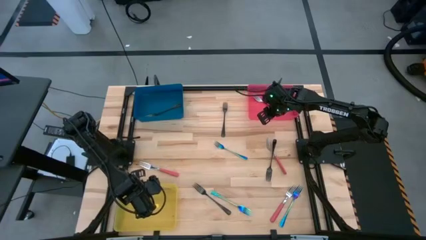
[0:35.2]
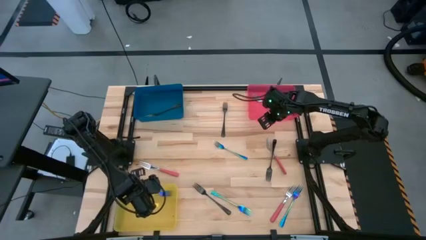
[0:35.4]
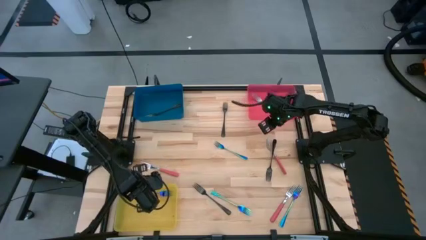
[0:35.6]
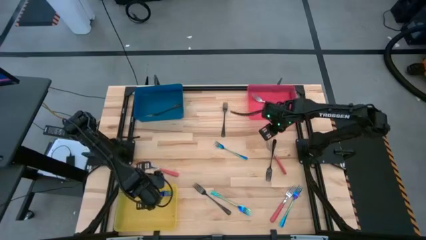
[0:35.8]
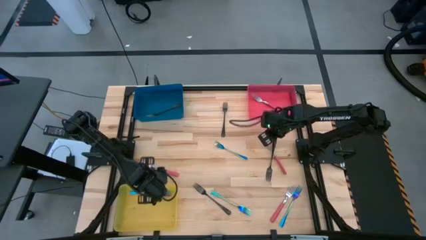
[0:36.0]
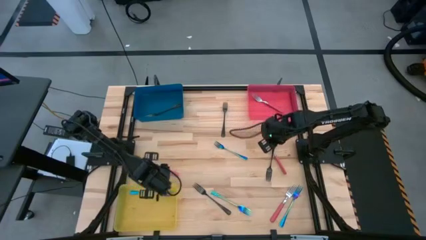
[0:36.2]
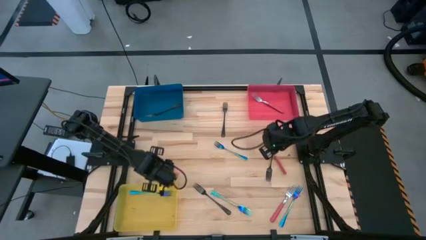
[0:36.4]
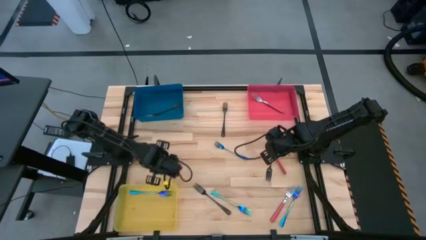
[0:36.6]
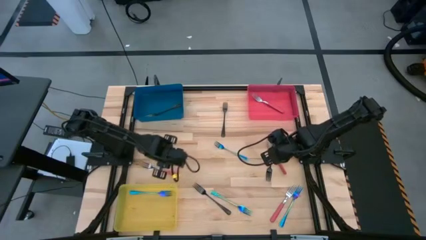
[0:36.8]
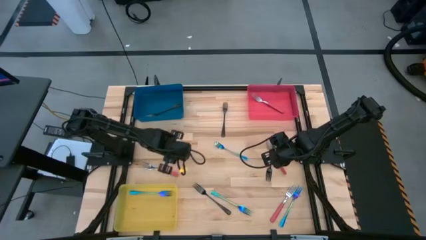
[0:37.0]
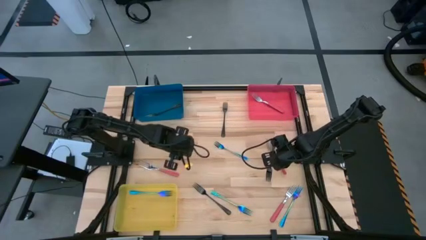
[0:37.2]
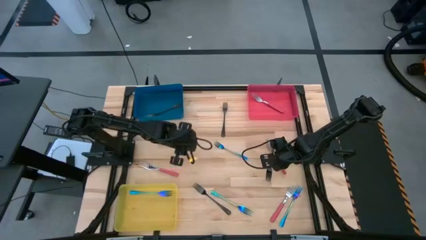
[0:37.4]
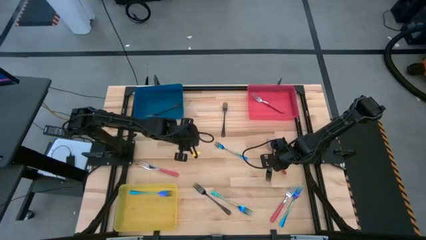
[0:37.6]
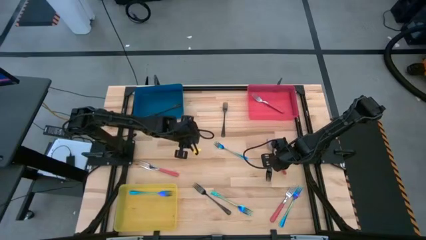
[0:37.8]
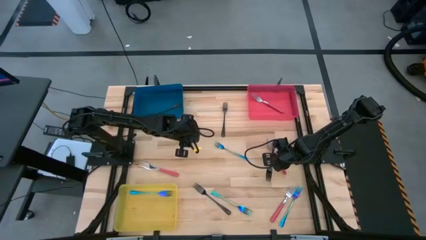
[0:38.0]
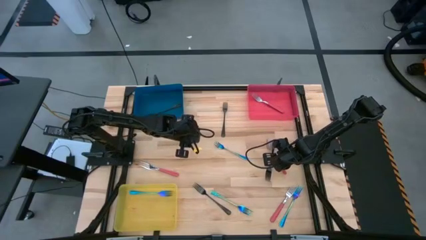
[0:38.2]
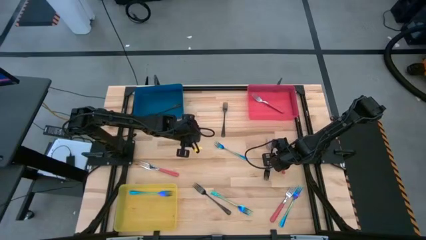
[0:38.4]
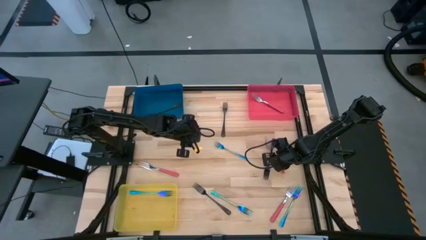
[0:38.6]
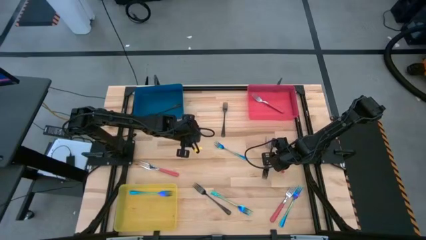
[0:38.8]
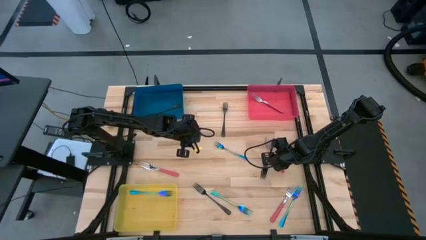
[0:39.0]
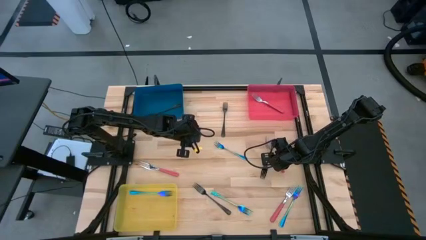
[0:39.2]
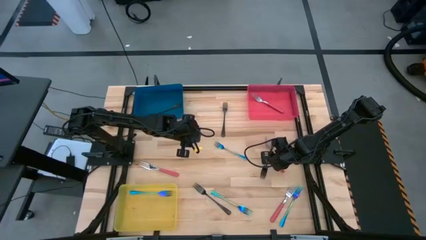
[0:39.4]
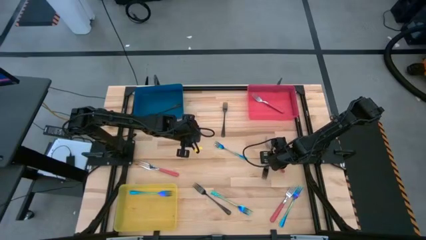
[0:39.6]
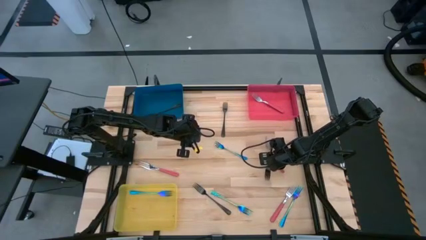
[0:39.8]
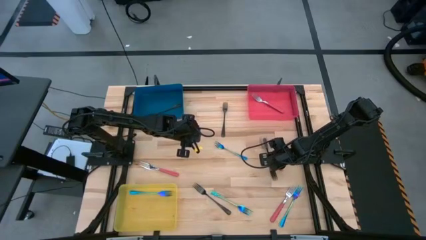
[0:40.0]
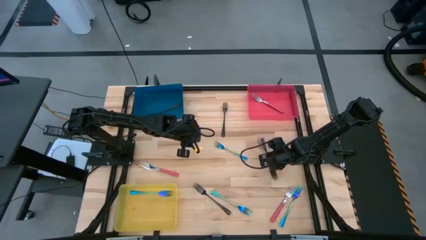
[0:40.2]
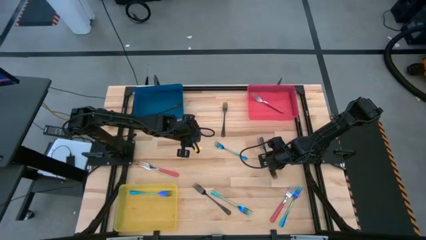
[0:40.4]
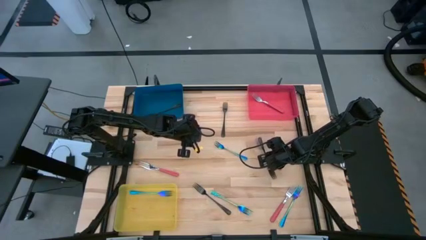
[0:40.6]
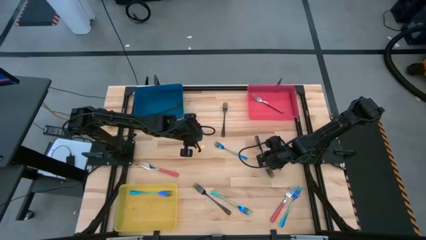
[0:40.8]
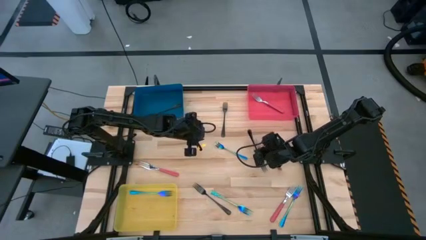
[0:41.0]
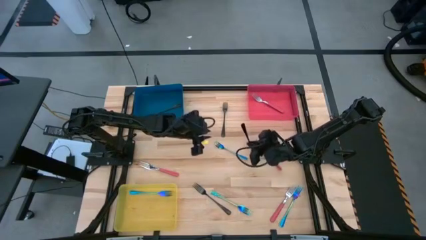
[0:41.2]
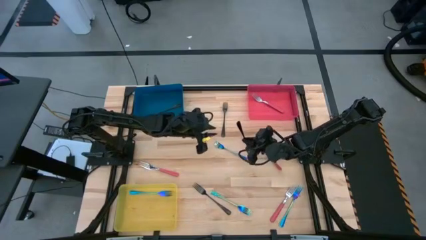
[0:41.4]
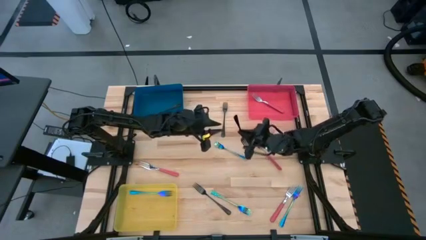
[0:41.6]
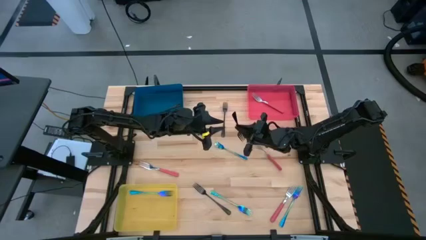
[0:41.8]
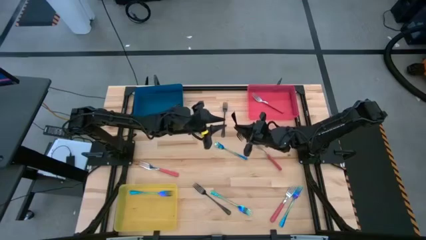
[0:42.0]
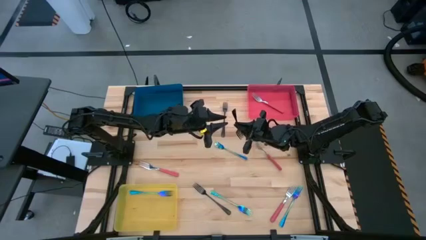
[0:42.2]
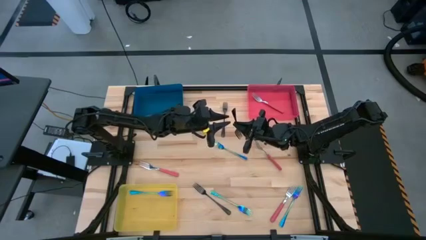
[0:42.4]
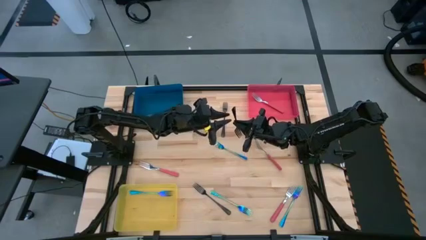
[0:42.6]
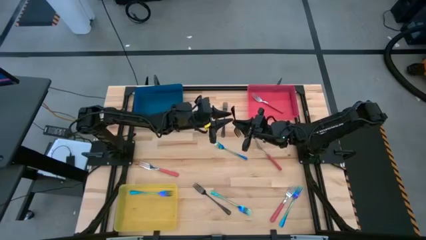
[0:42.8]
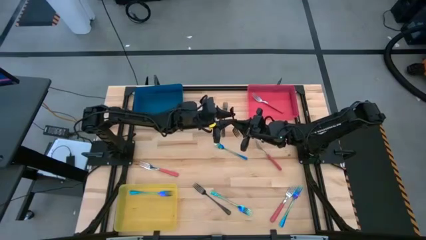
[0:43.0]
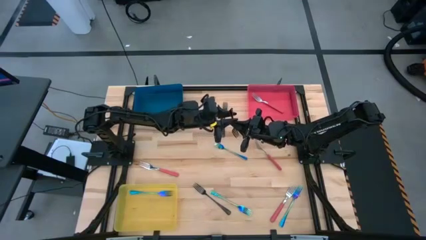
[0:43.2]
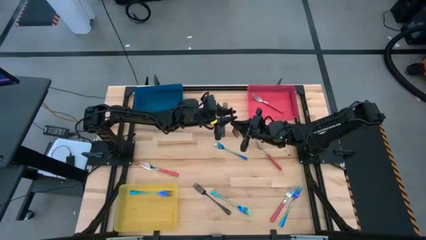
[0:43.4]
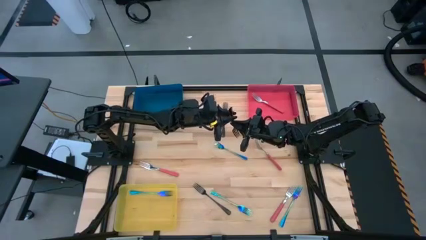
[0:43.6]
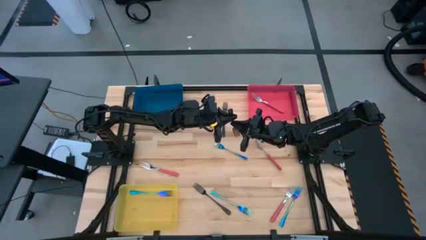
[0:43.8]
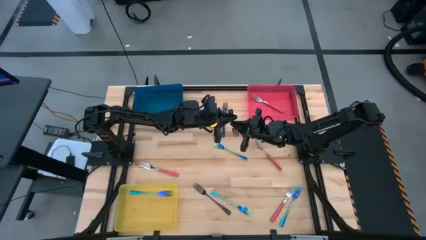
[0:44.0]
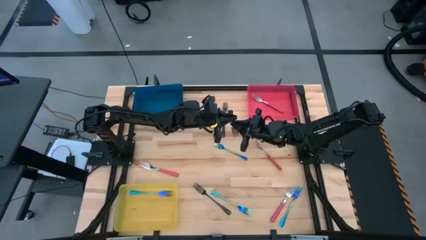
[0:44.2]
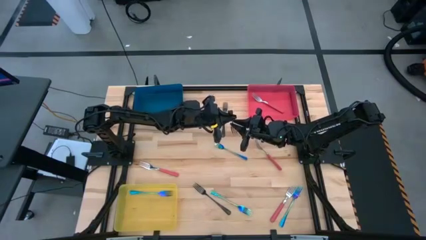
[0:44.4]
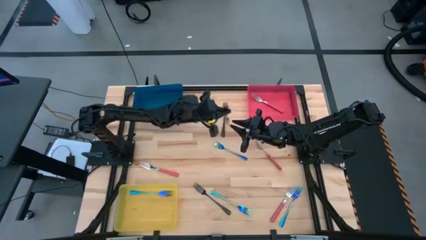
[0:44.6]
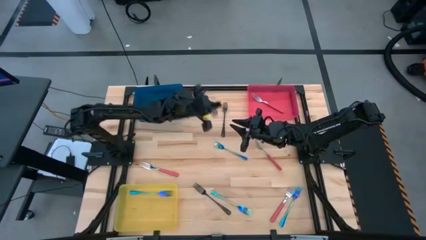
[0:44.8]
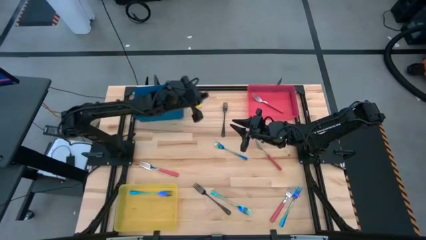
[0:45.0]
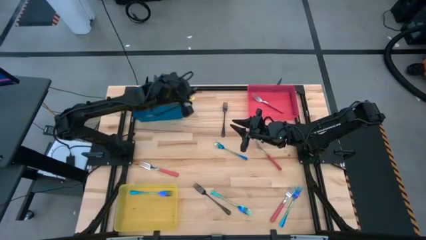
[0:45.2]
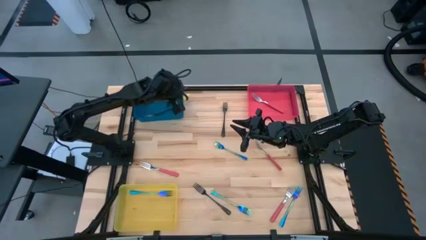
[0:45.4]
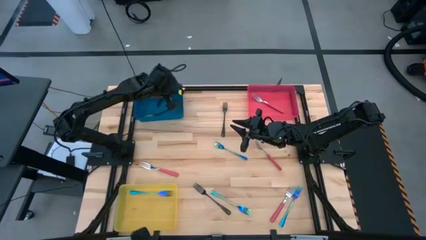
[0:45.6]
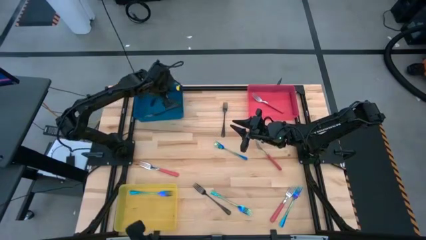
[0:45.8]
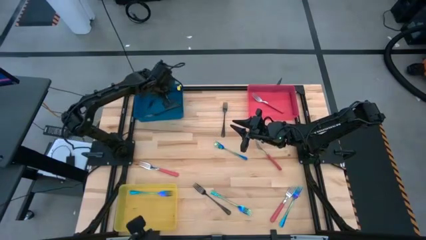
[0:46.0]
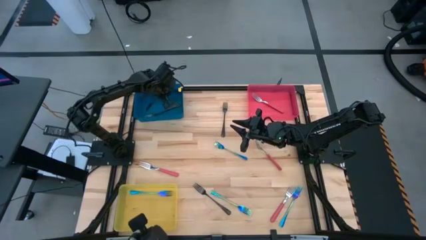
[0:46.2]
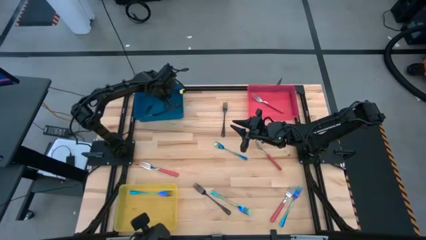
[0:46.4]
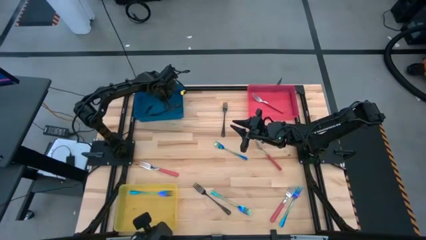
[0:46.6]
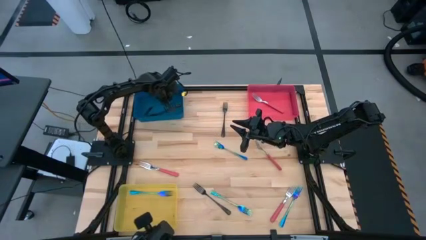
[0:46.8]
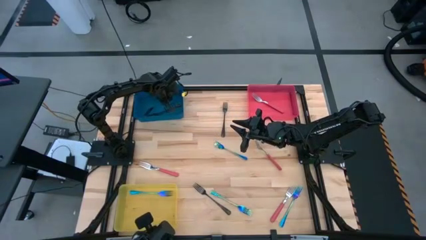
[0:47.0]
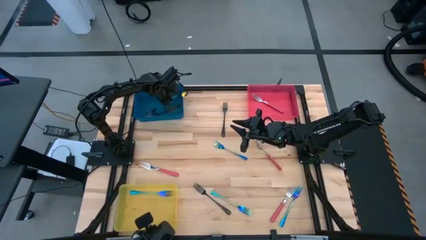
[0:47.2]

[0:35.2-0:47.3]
Task: Sort silverware by color (type)
Put the middle right black fork into the blue bin

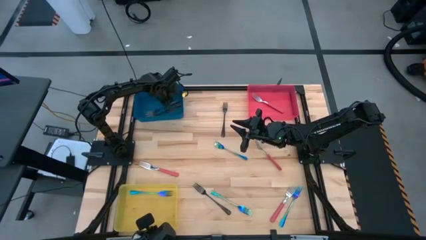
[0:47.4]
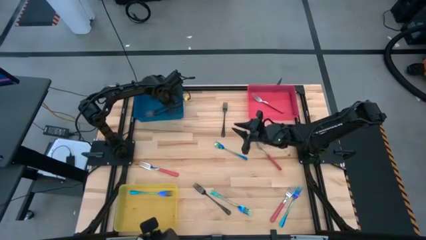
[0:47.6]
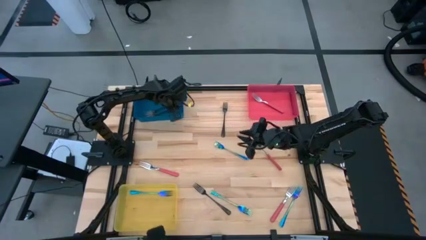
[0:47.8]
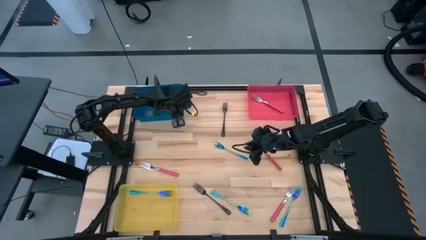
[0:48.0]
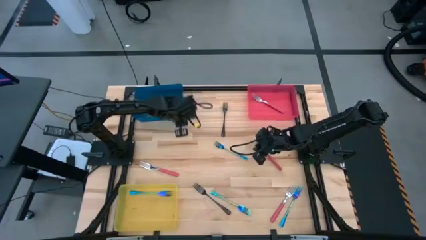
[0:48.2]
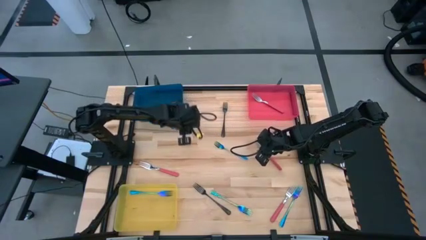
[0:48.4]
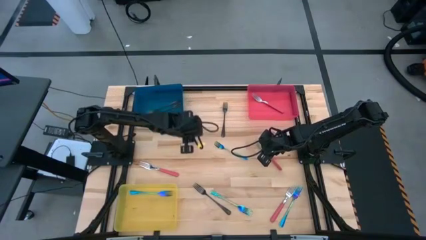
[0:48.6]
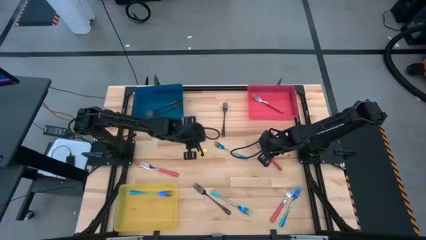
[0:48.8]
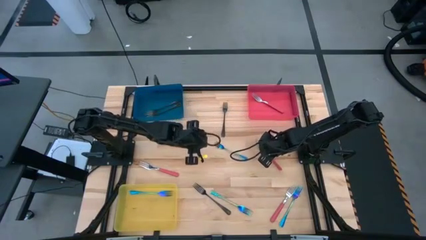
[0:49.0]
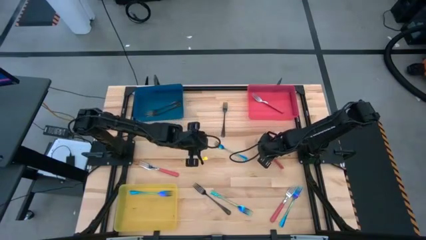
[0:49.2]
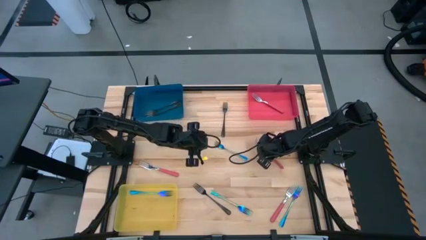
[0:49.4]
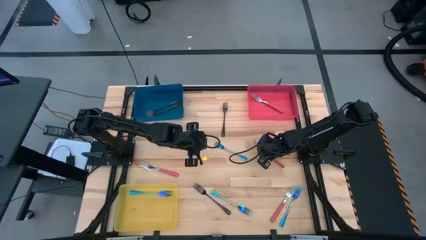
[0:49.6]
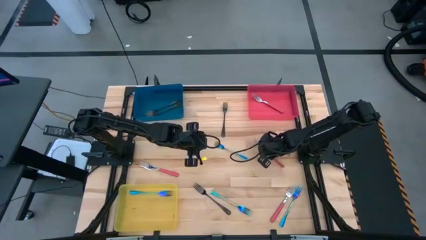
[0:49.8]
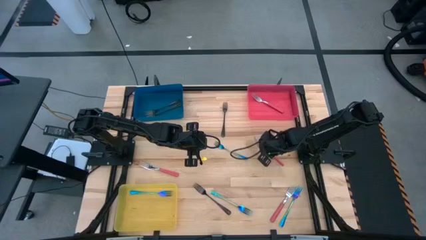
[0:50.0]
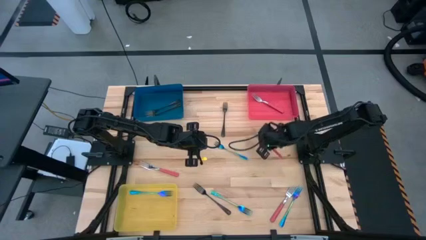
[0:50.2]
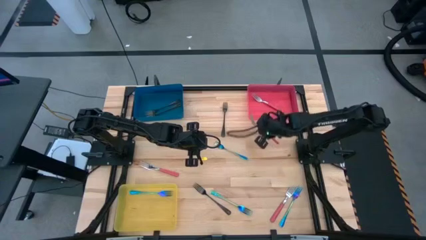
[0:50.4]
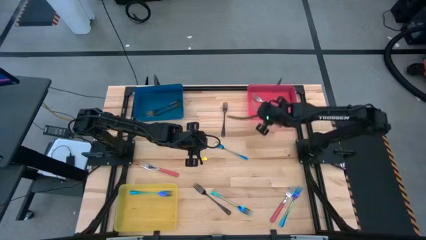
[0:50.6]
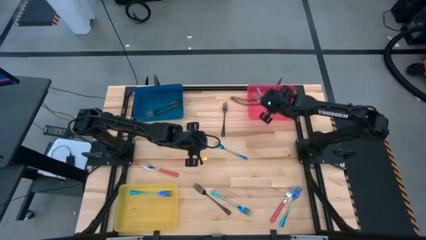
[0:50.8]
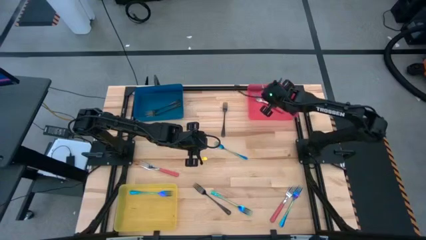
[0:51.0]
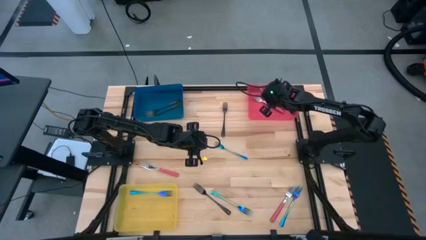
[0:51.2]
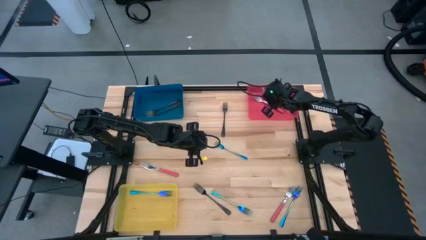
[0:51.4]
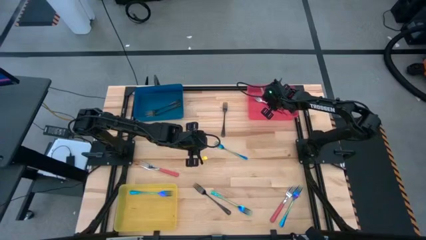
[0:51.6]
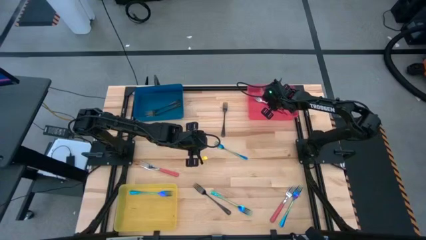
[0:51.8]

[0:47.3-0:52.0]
Put the top right pink fork into the pink bin
